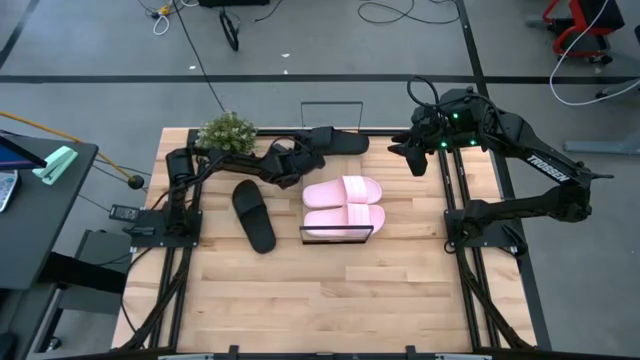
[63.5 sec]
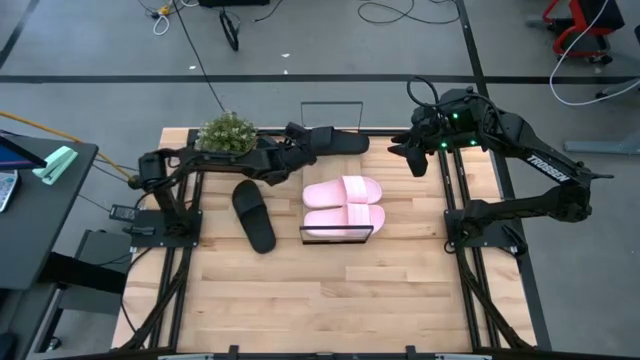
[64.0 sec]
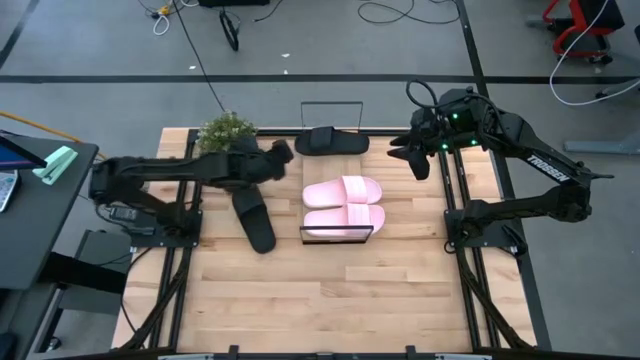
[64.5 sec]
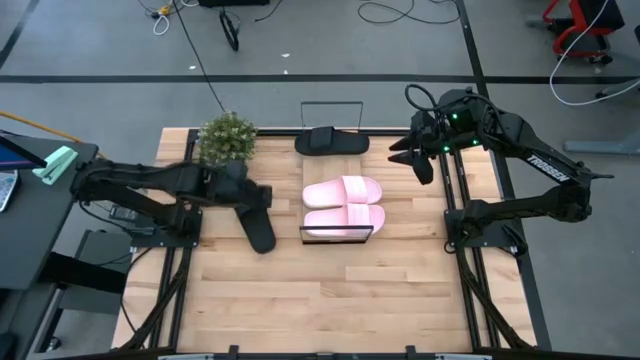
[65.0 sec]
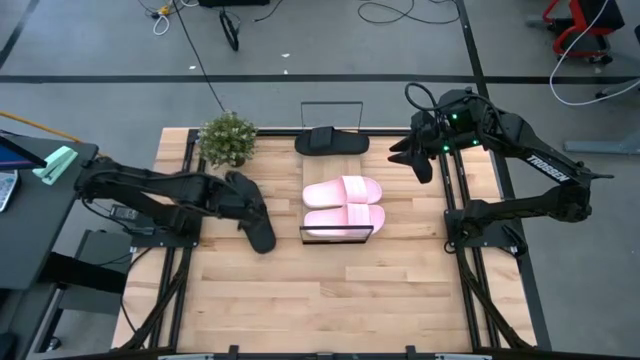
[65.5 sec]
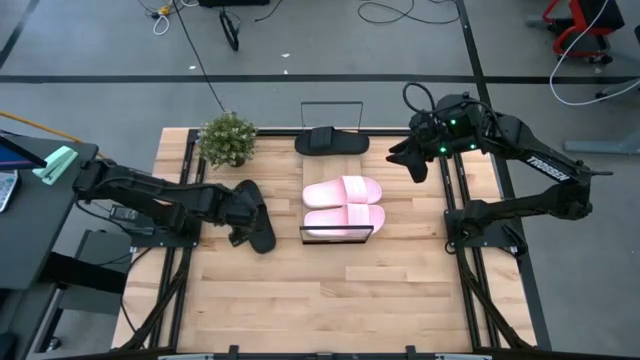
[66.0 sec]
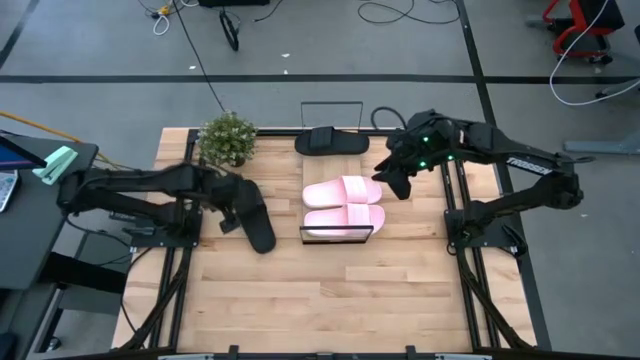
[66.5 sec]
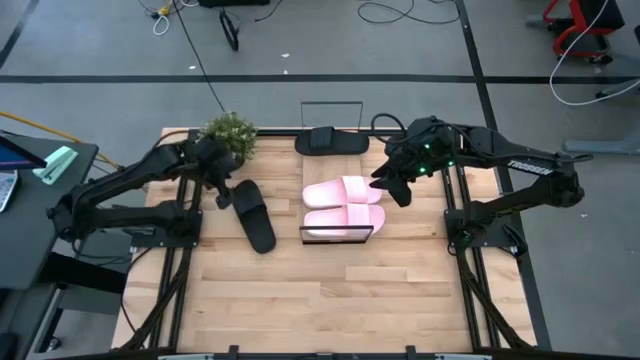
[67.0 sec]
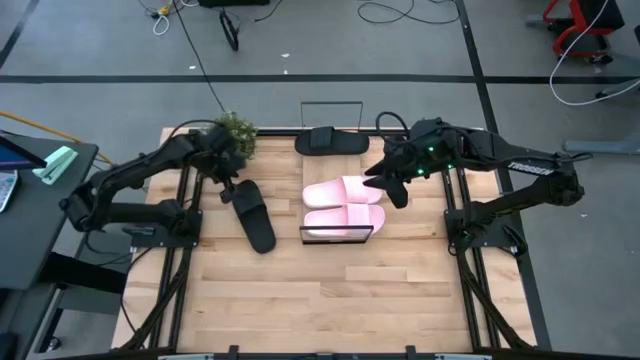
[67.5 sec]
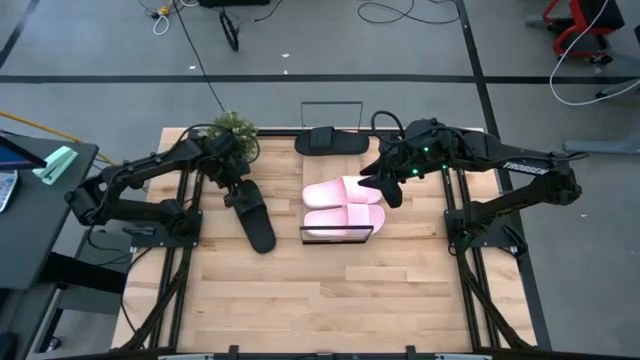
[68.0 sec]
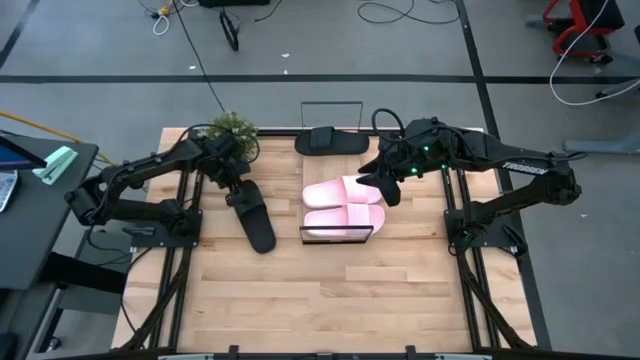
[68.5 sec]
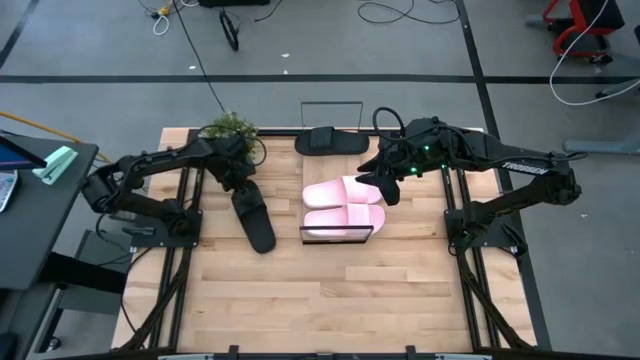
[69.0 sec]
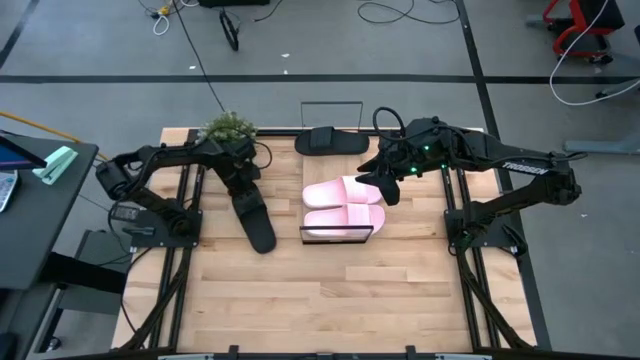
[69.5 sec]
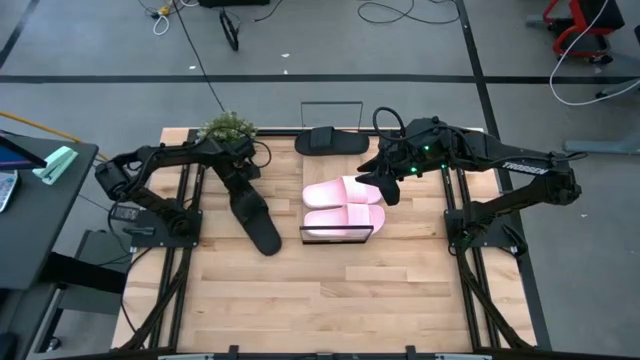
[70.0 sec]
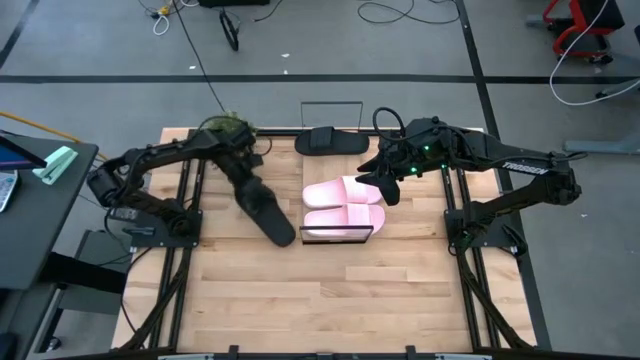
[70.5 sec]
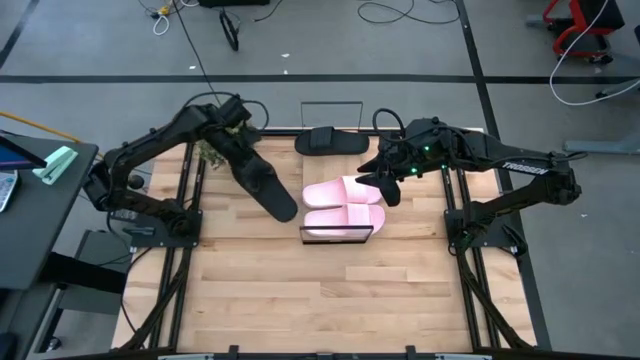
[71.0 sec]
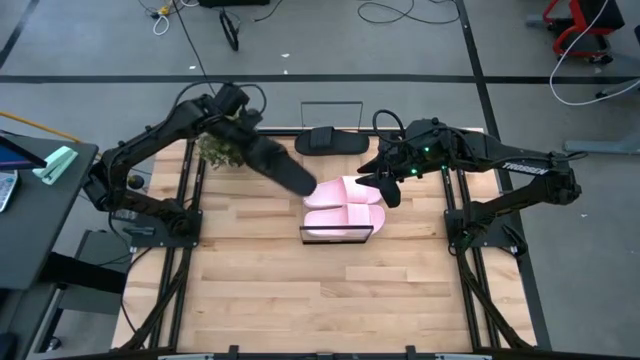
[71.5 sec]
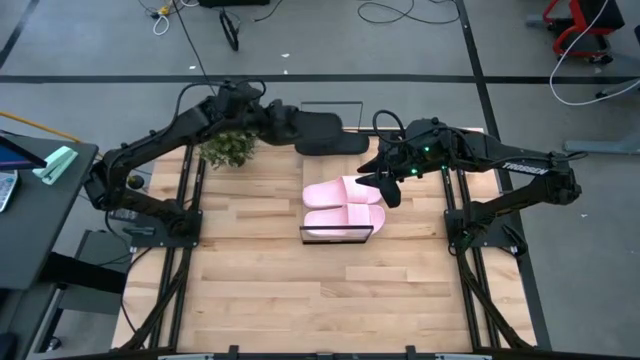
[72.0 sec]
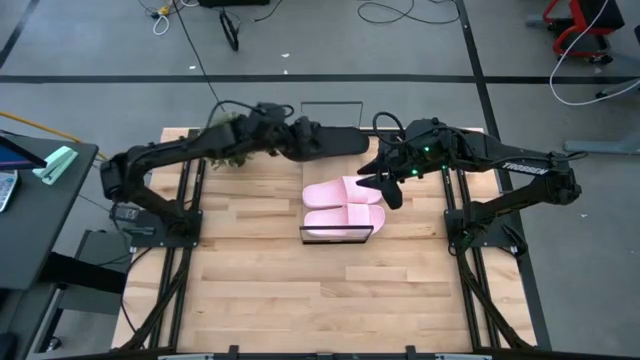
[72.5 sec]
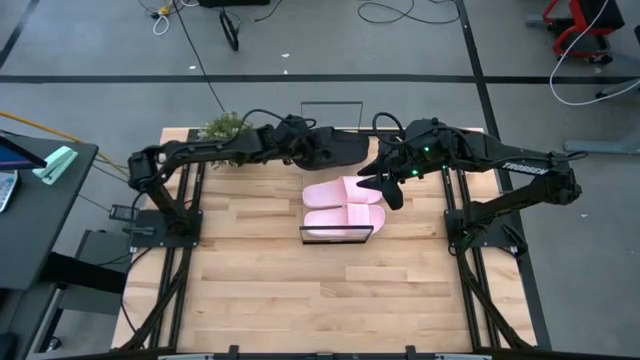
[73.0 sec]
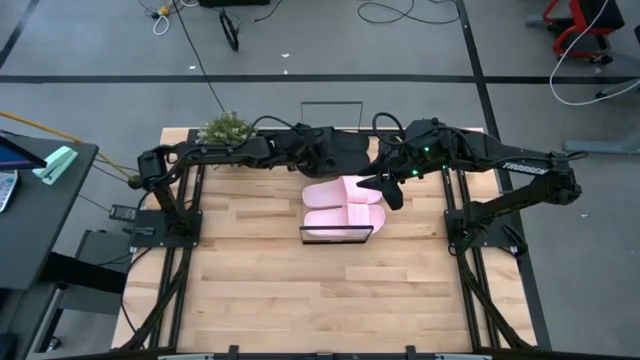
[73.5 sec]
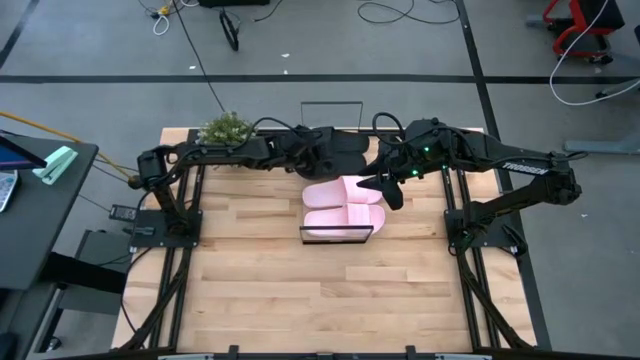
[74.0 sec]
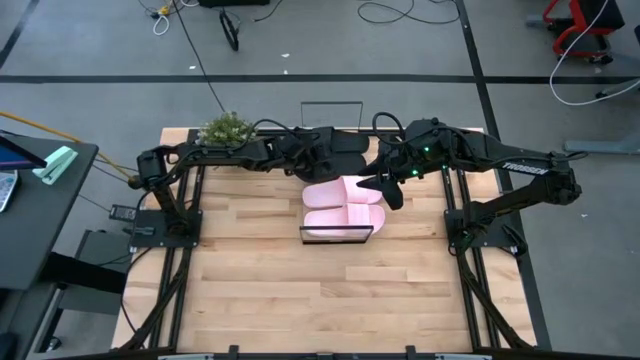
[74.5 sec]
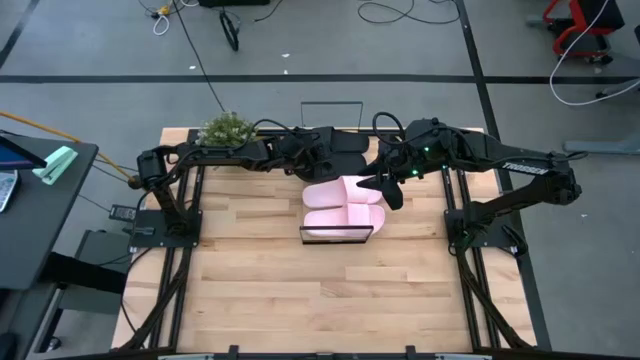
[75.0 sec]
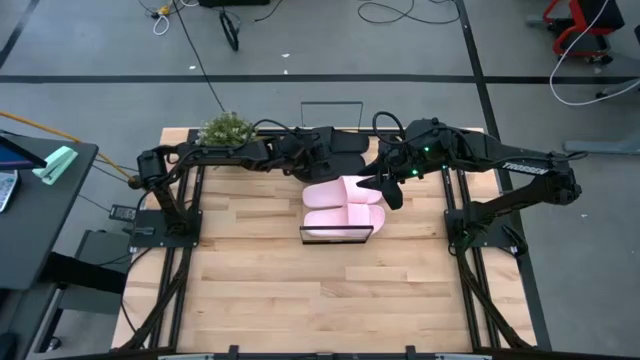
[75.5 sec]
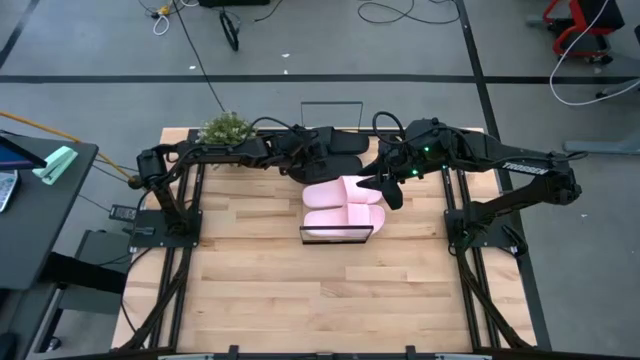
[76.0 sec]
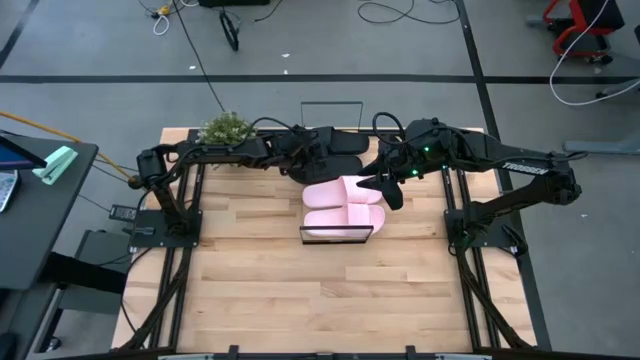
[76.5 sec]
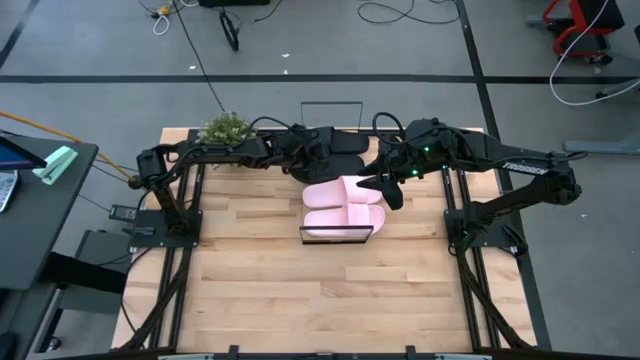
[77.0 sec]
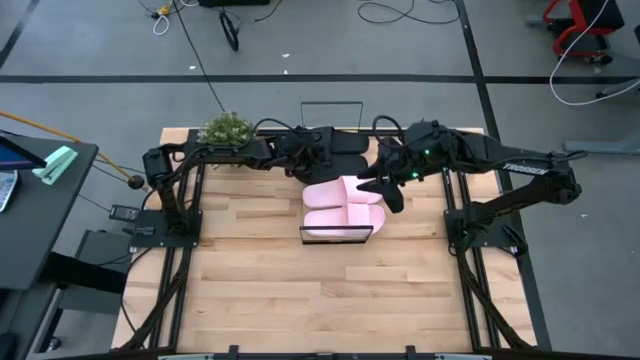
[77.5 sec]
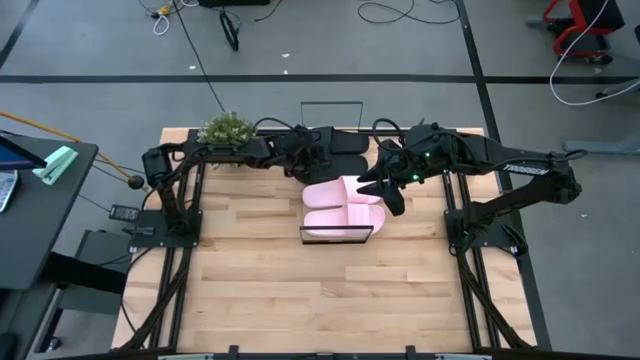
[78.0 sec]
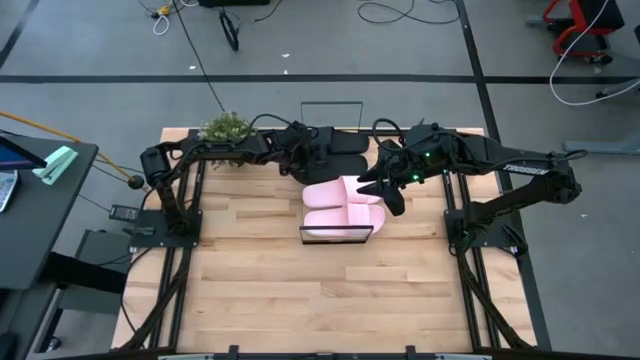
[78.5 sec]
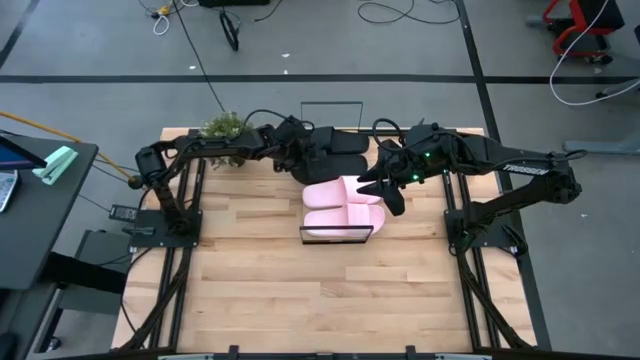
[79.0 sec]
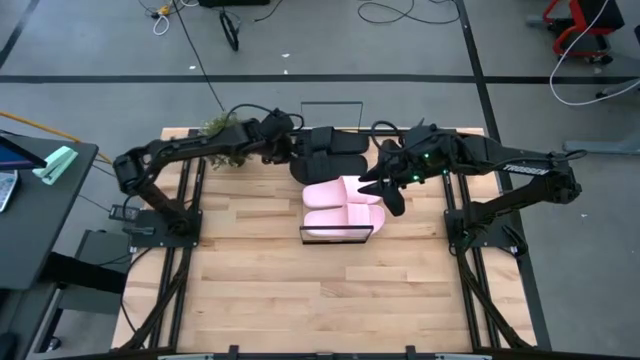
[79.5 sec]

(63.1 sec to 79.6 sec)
Task: Pick and place slides into the shelf
Put the black slides on the shelf

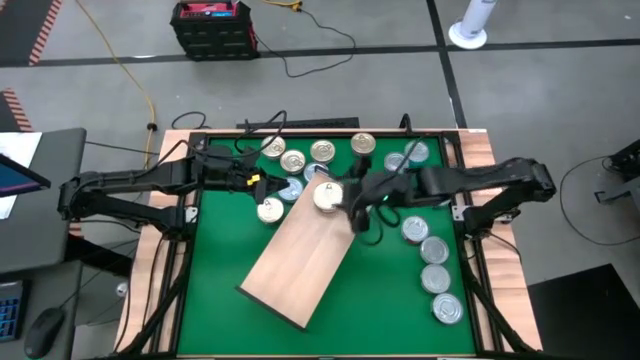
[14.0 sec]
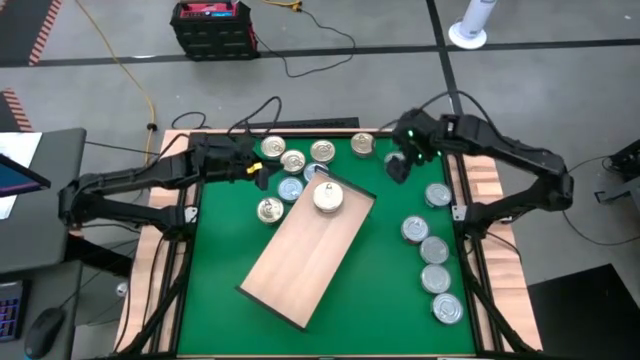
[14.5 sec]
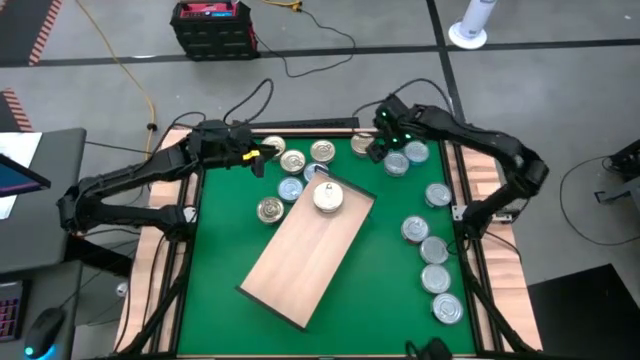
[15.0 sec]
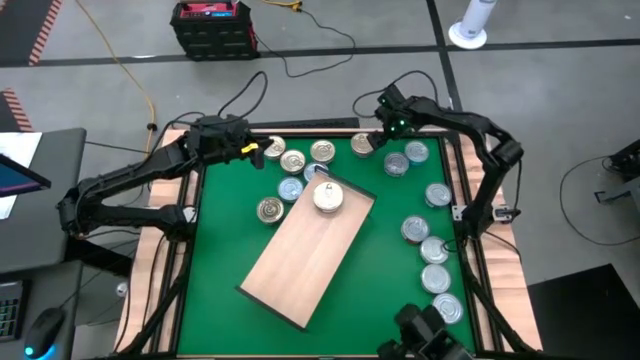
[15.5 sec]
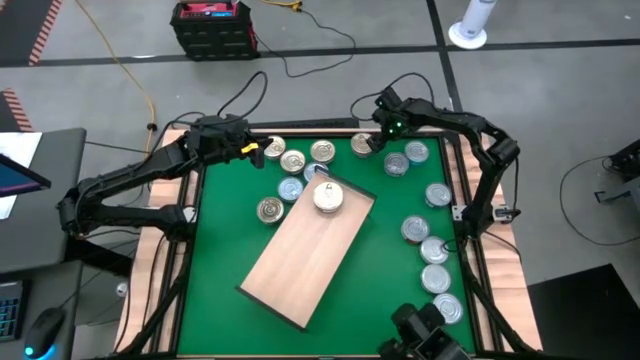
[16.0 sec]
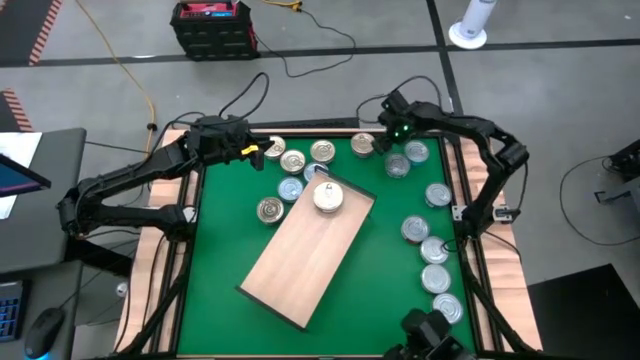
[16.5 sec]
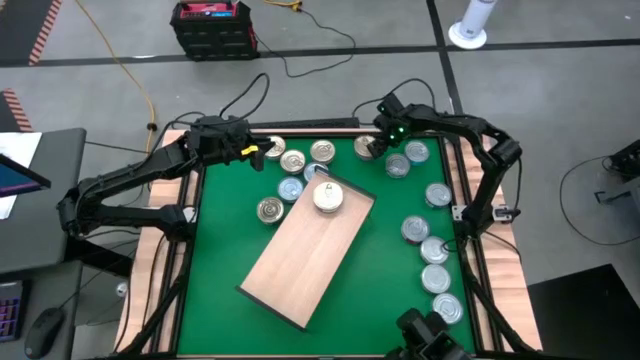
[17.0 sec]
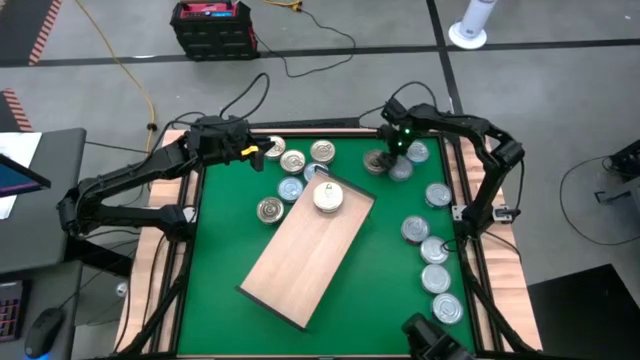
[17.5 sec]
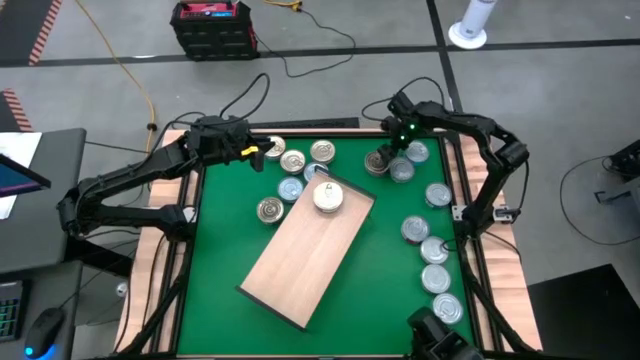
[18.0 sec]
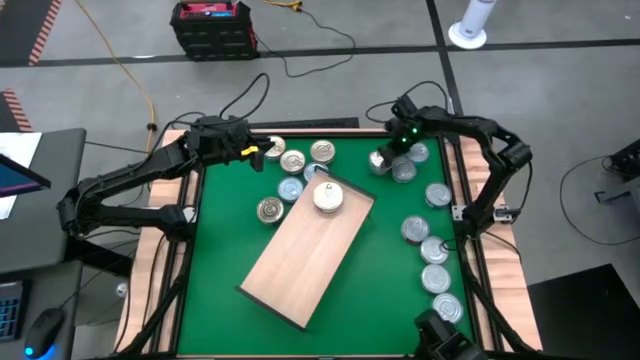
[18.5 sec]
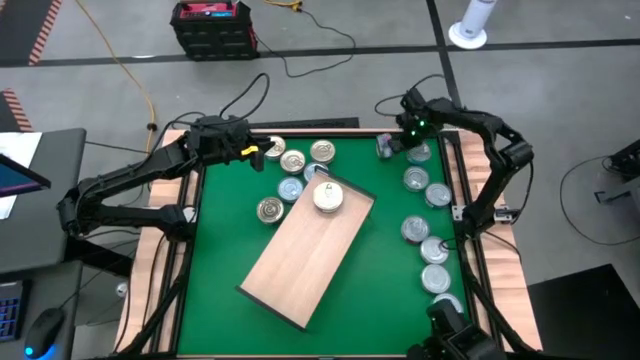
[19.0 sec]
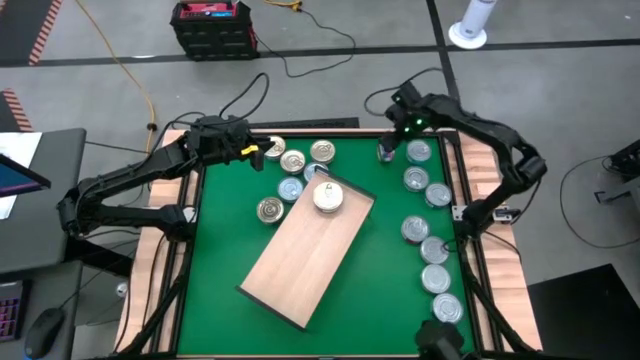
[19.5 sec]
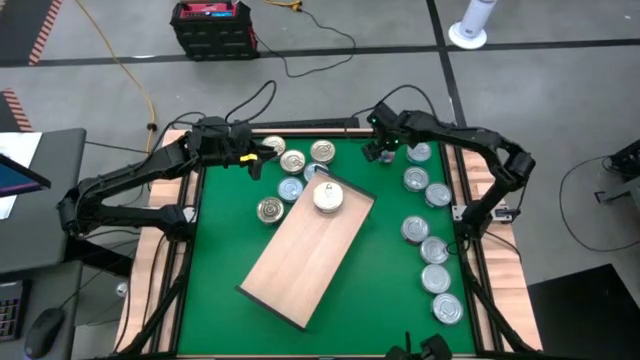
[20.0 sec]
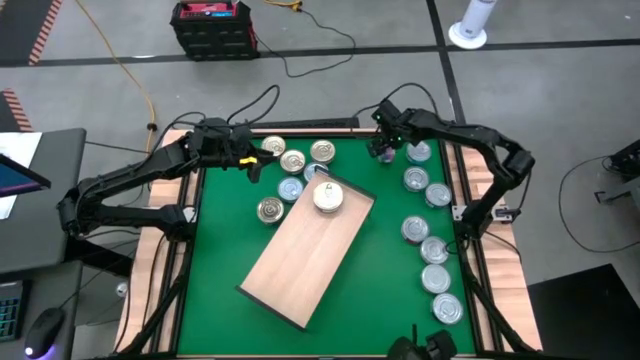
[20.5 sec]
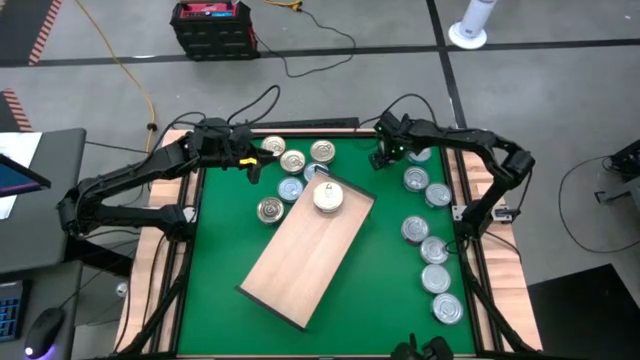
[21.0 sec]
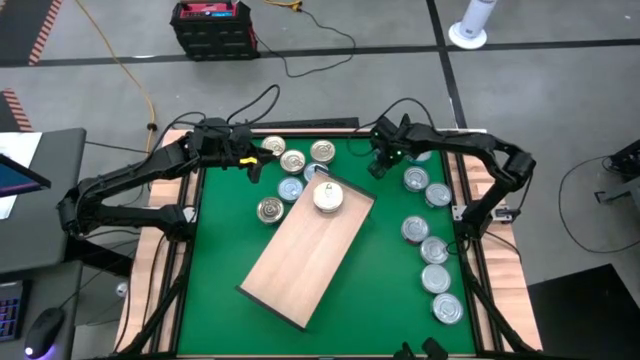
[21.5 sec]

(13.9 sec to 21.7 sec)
Task: Stack canned seafood by type on shelf
Stack the blue pink tuna can on top of the other blue pink tuna can on the shelf
